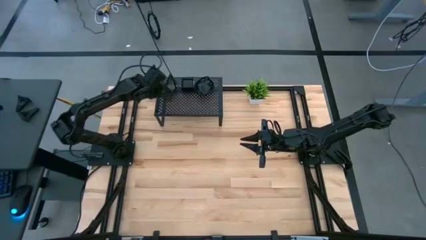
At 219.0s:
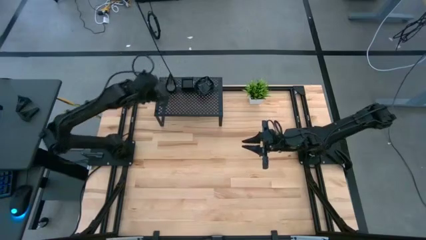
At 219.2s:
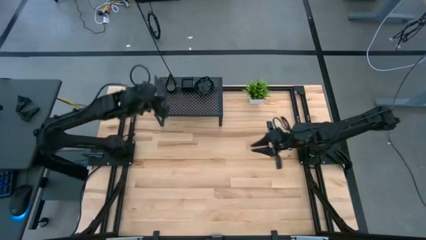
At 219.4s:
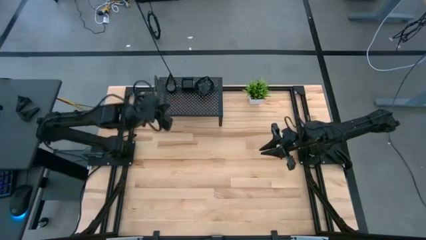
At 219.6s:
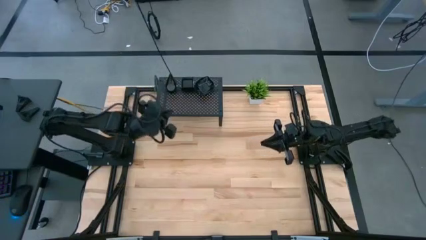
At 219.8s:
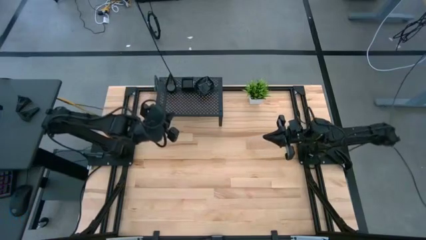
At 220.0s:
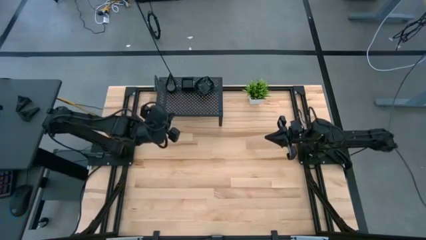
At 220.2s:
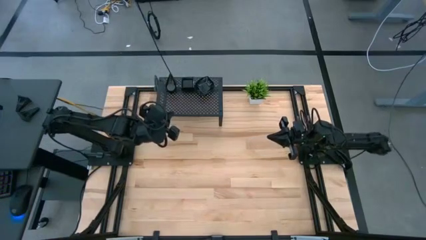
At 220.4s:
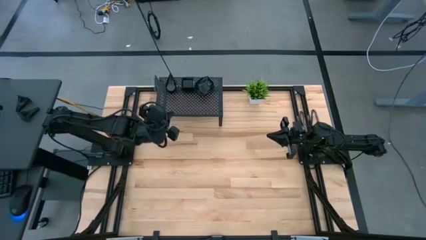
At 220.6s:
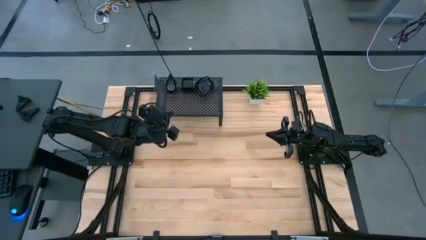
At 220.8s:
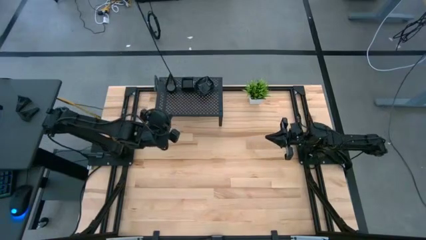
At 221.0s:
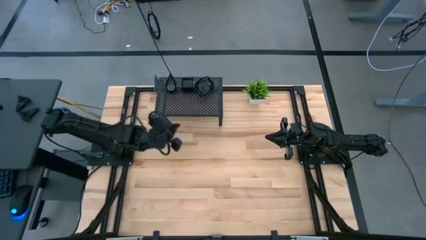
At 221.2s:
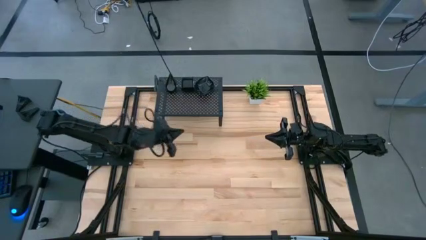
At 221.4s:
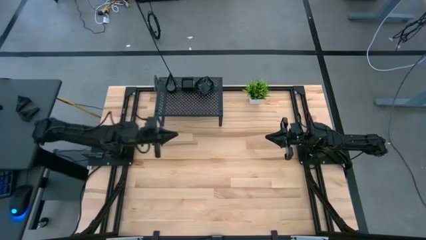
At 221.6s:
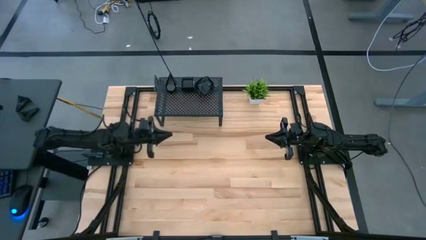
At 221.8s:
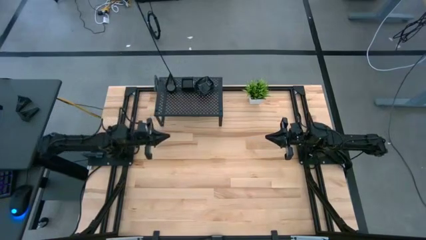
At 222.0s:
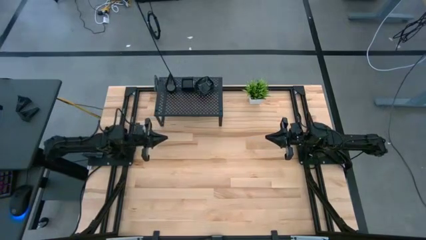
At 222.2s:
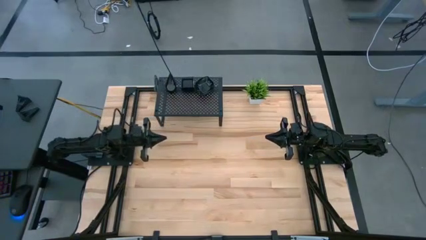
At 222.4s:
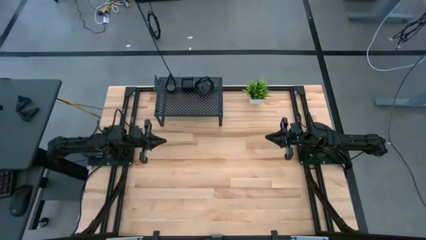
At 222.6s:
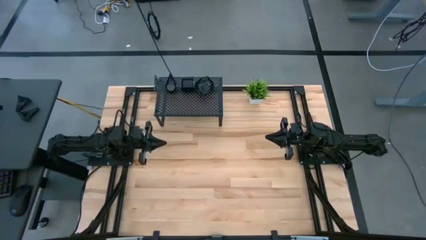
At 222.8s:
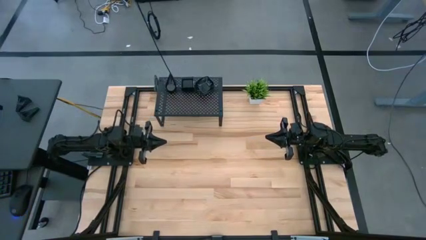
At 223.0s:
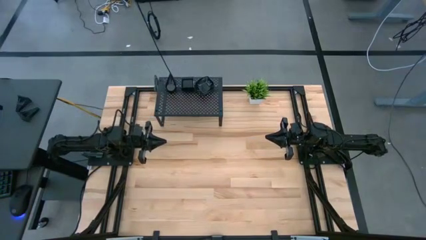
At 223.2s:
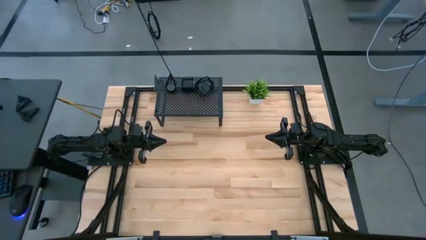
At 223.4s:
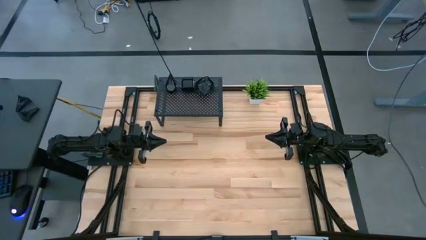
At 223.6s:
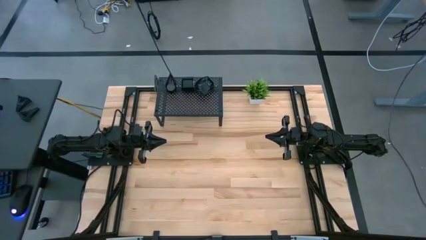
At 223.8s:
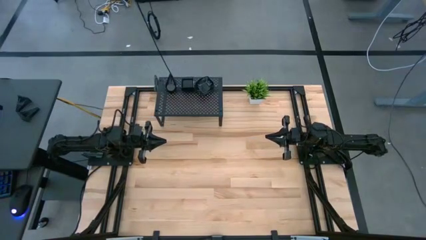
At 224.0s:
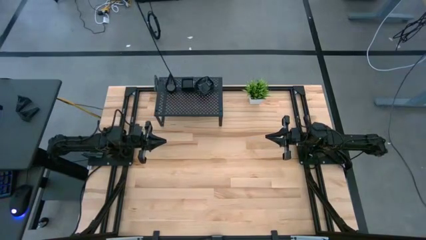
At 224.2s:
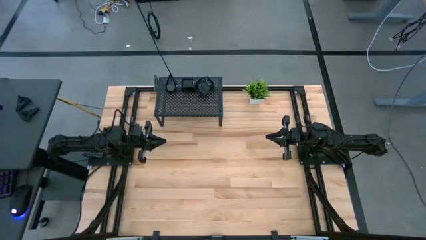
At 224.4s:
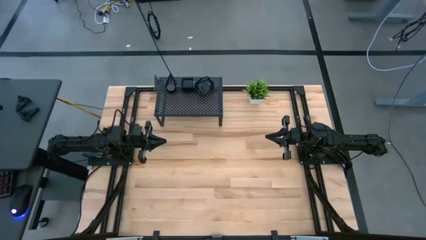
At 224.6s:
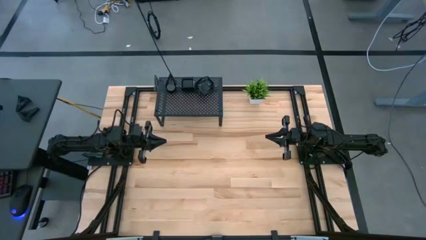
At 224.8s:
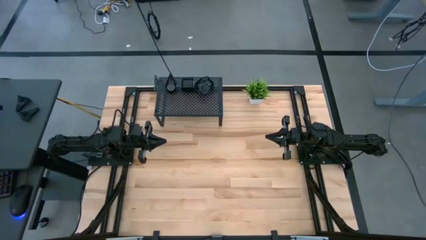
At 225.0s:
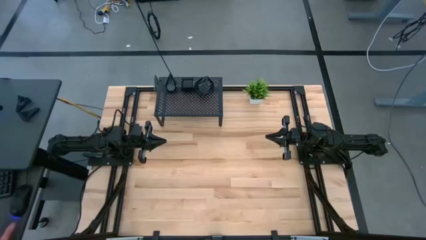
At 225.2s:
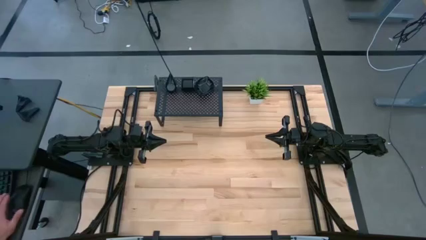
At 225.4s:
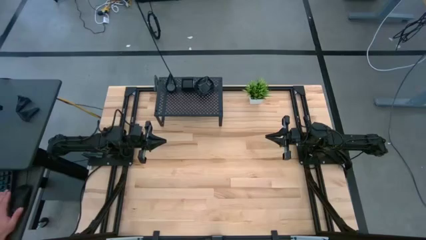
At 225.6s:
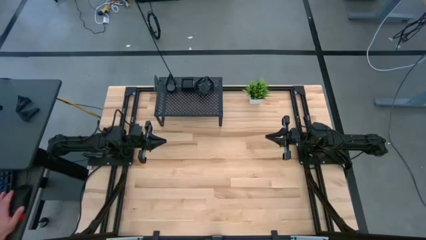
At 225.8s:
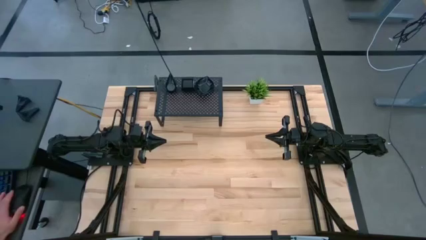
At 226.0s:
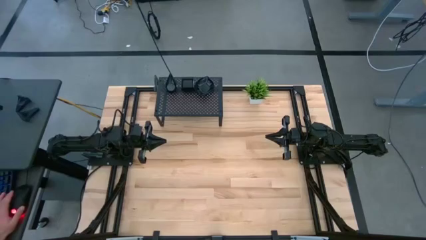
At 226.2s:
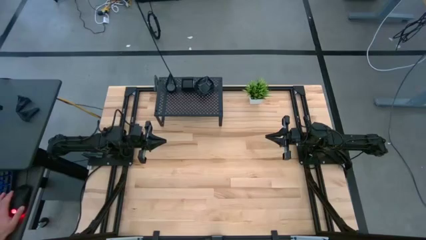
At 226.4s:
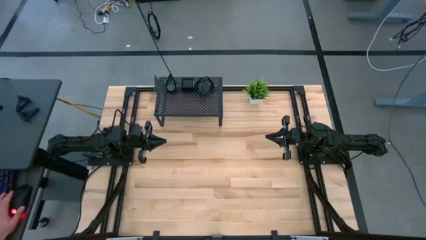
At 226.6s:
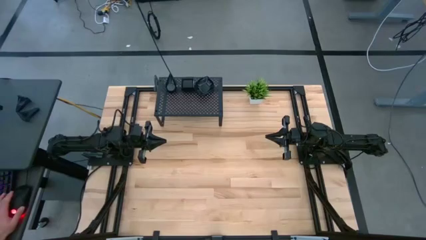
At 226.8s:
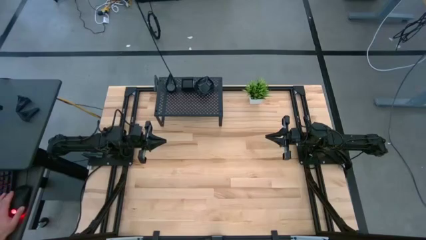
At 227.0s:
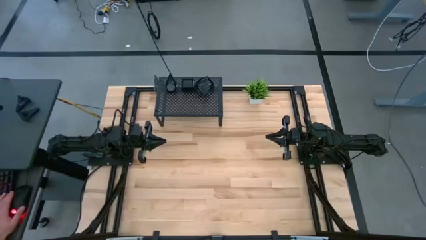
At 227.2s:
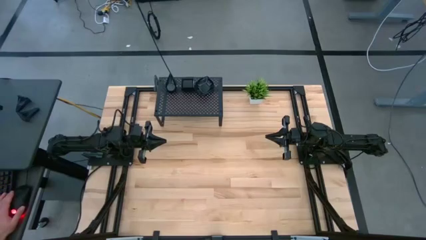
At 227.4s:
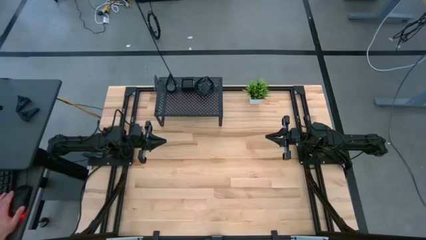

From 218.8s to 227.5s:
Task: Pick & Place Mini shaped plates
Return to Home Position

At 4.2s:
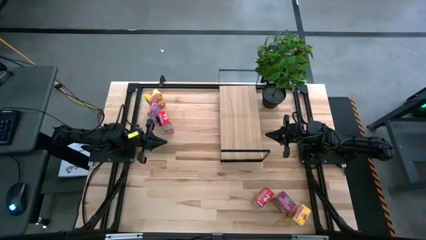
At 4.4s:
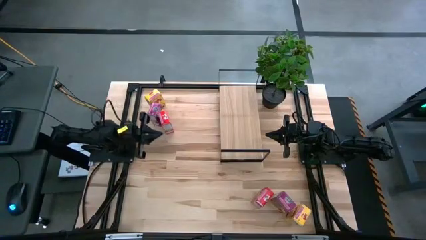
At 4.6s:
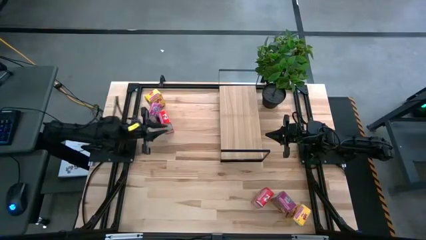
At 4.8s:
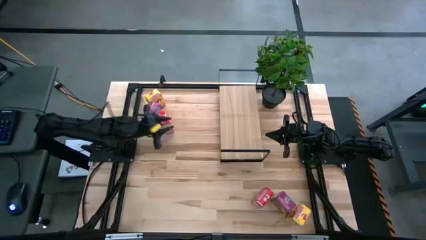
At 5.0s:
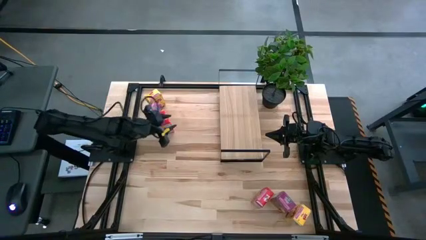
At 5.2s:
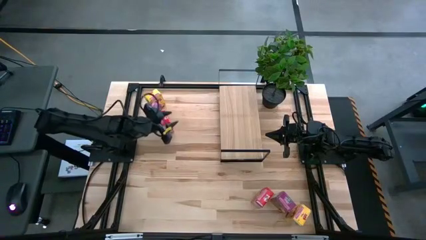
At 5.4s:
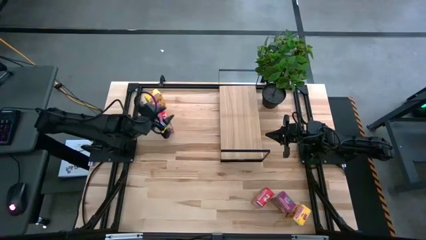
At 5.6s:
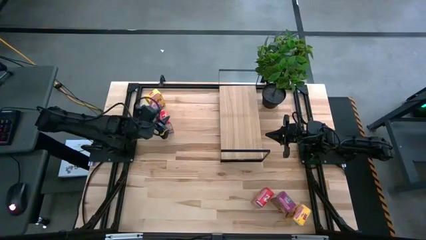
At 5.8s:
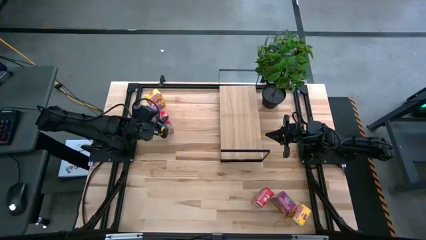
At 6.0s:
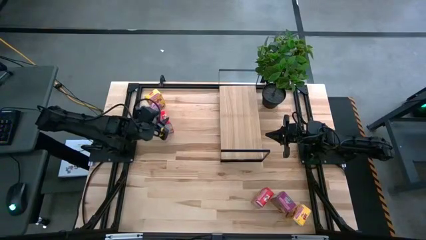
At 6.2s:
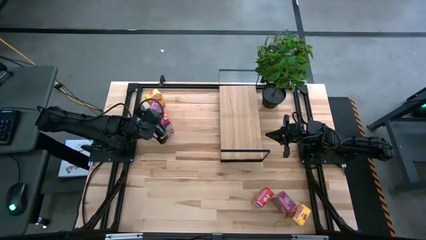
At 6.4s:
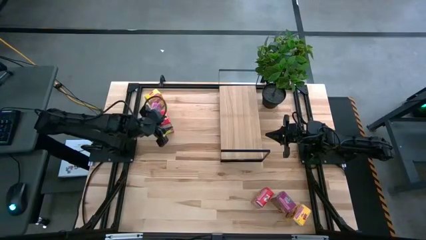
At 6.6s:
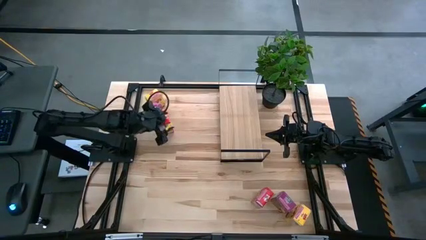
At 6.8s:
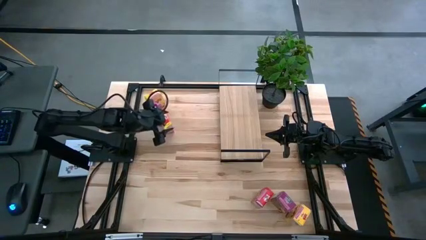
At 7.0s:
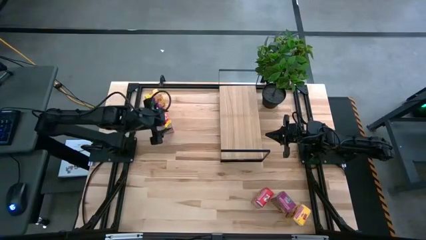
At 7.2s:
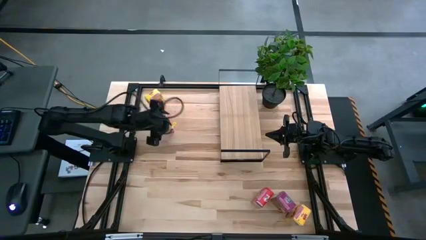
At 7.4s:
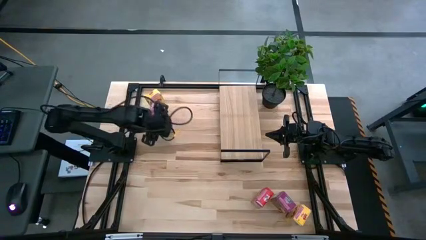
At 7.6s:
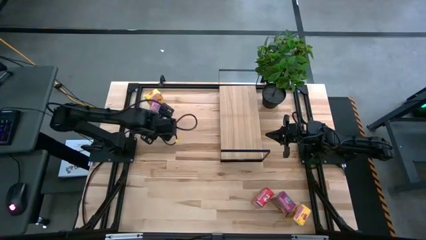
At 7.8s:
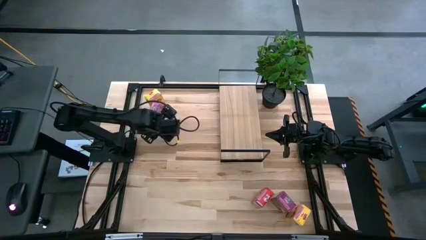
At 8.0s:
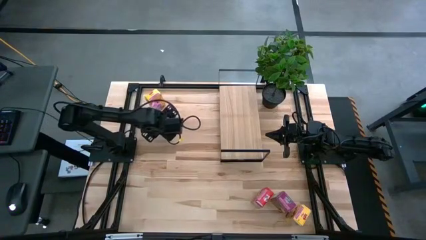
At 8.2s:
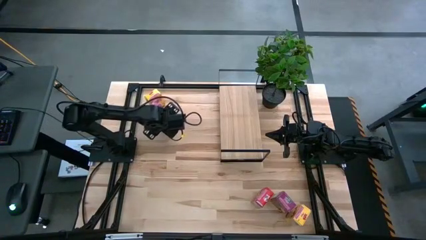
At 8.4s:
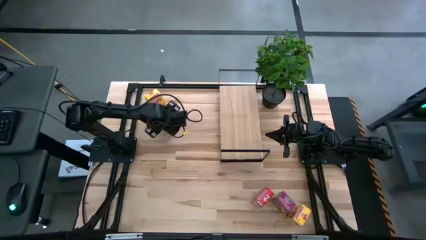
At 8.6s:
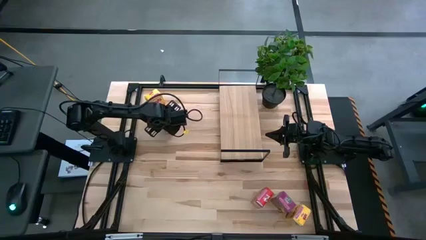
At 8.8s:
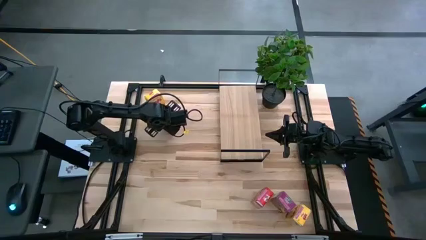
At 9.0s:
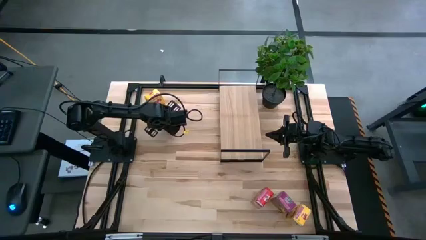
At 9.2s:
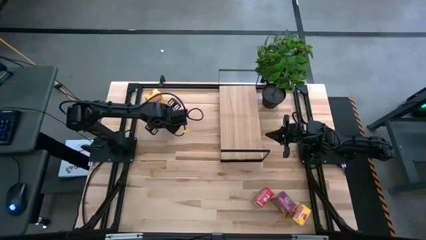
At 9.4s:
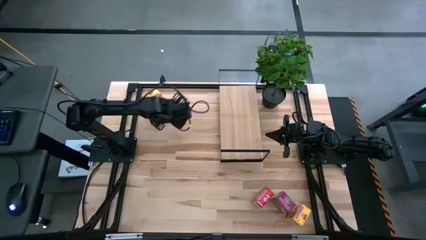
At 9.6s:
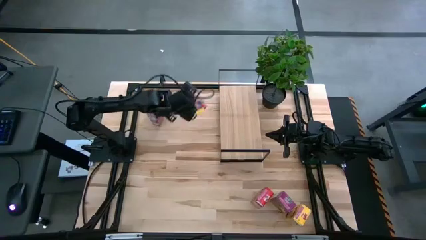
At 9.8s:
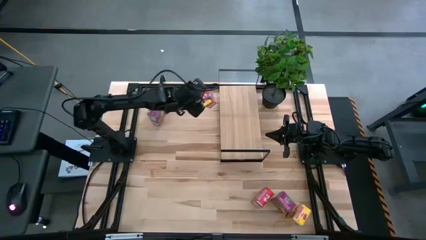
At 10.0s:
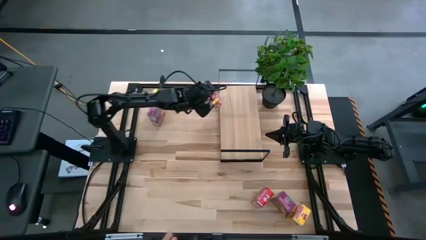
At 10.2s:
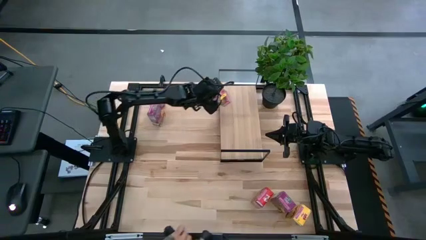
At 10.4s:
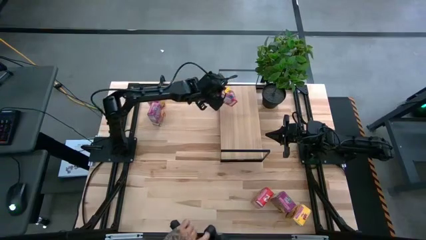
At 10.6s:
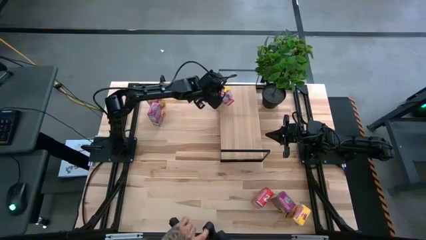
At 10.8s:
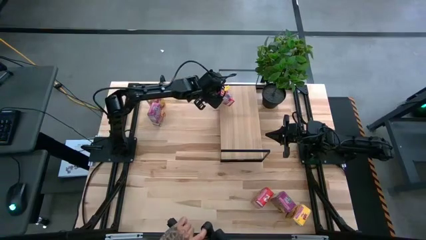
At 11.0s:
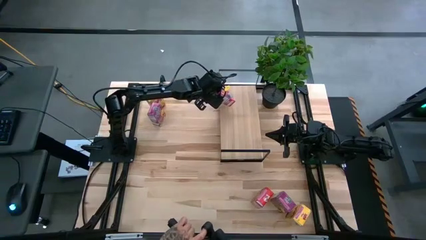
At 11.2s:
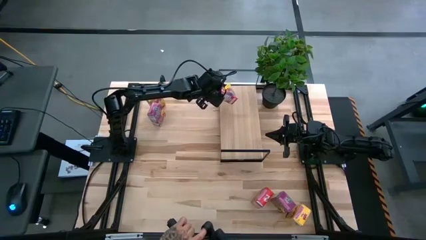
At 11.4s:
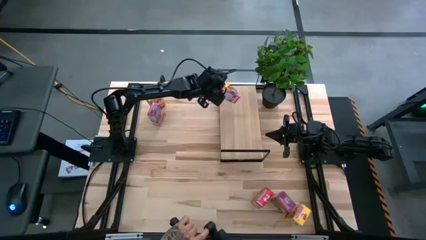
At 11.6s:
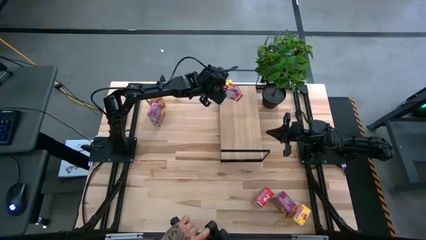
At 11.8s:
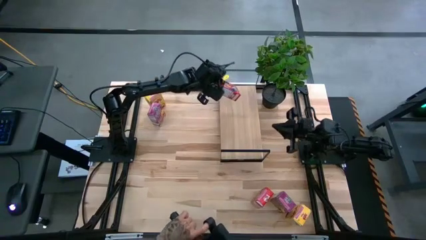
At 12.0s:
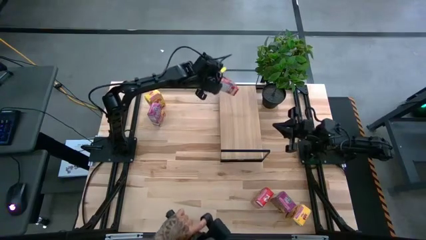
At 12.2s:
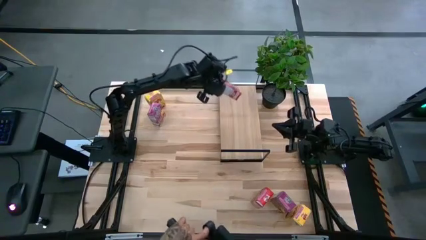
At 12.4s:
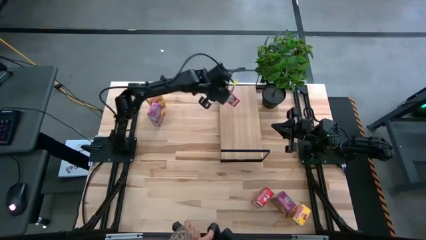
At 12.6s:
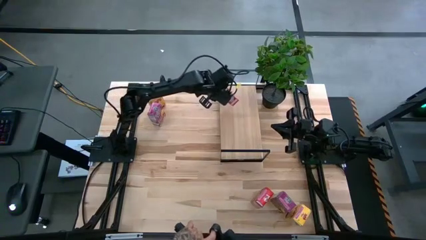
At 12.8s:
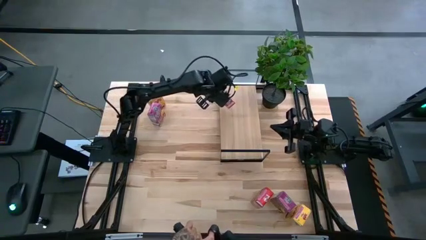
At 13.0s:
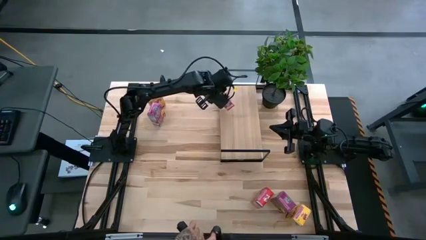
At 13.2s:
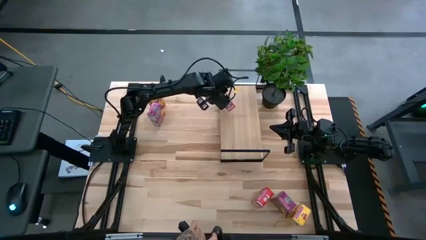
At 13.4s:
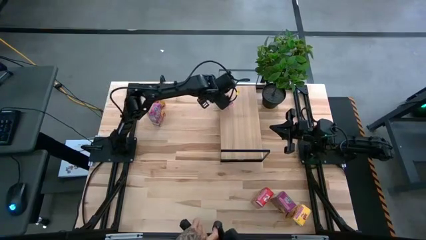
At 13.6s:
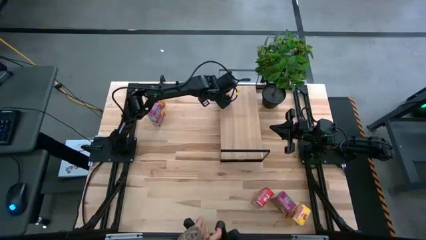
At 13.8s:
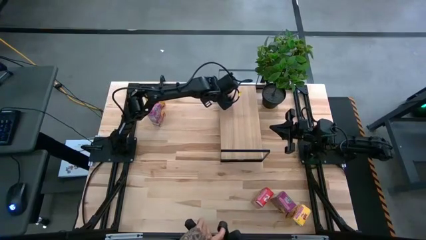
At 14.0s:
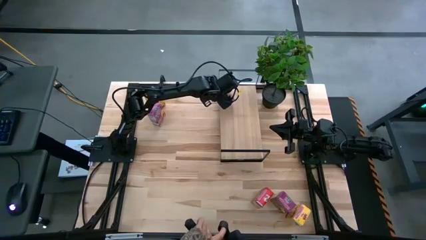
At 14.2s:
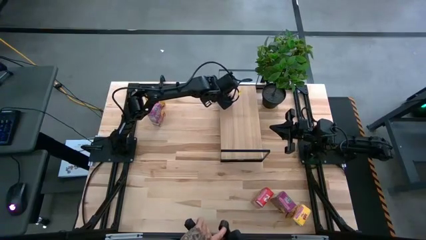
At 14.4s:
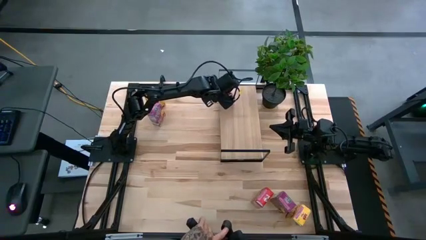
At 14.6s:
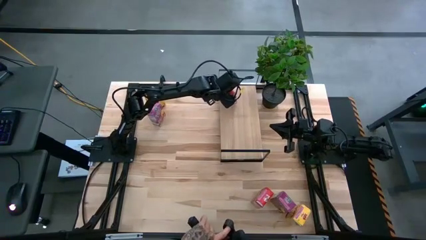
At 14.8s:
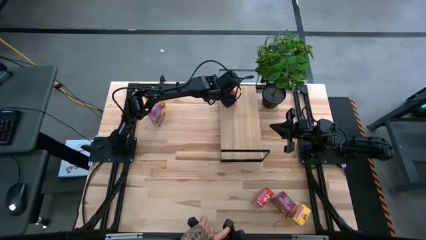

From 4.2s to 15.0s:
Task: Stack cereal on shelf
Put the top red cereal box on the shelf
